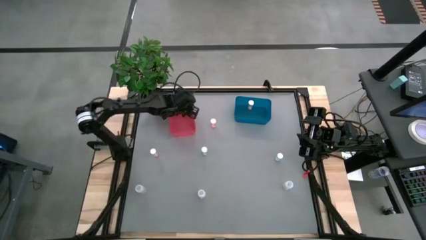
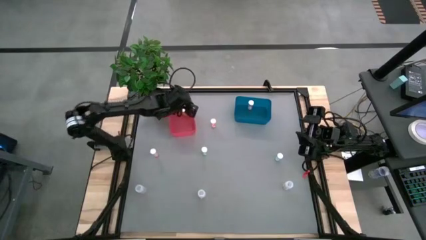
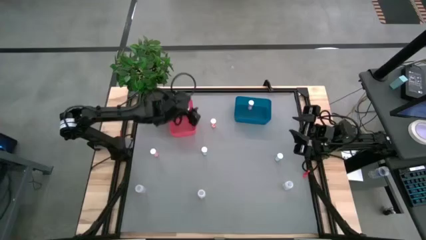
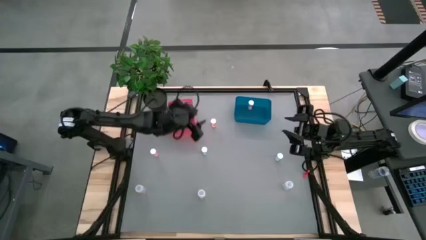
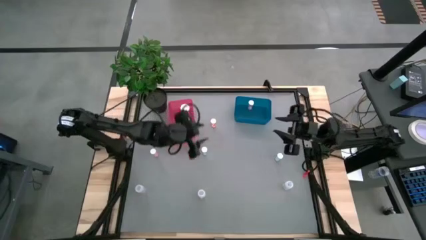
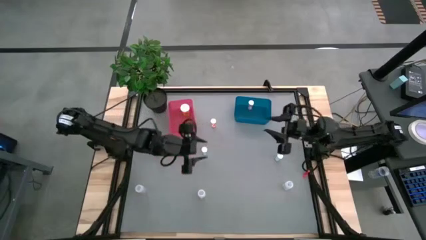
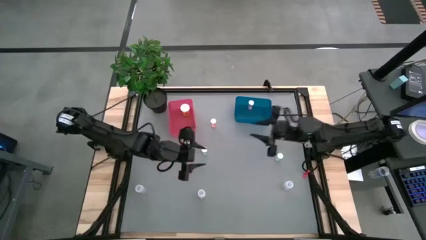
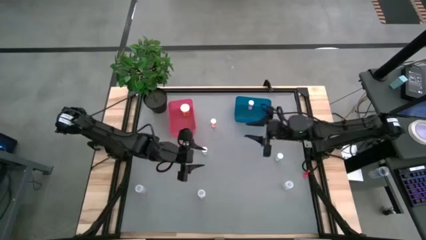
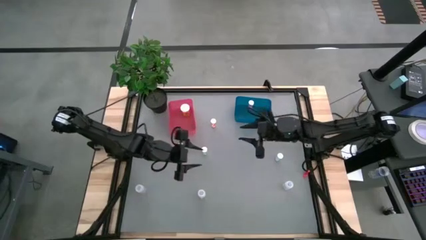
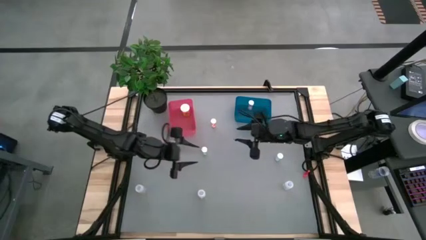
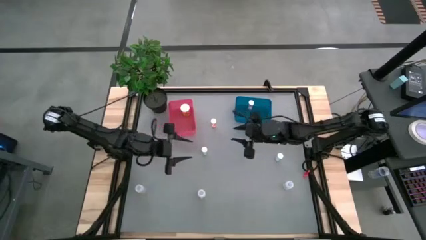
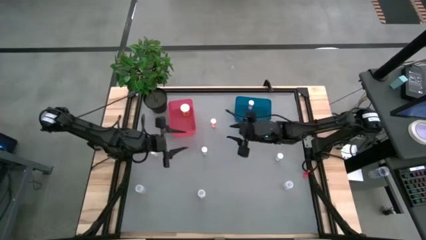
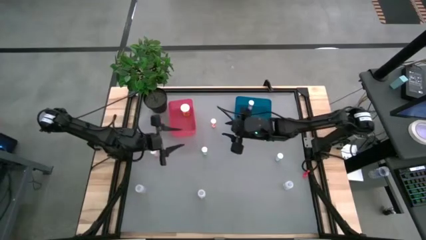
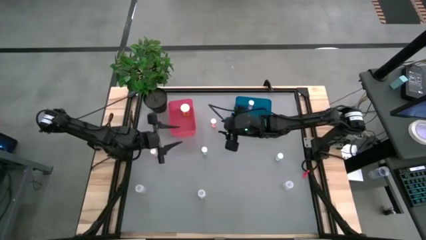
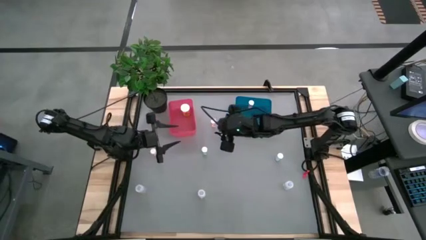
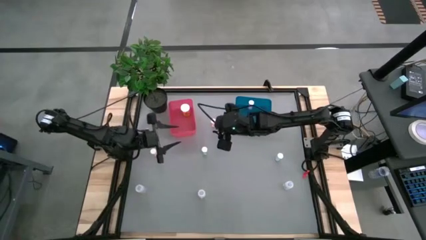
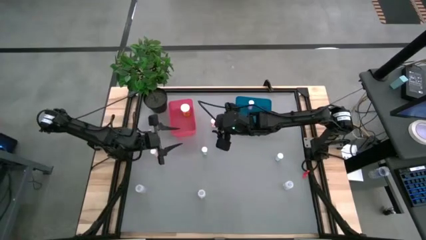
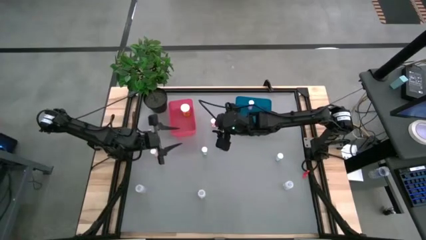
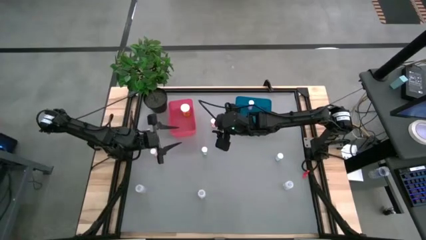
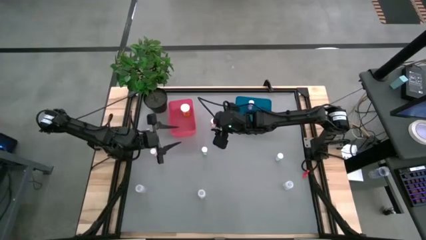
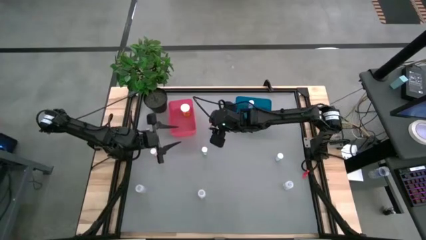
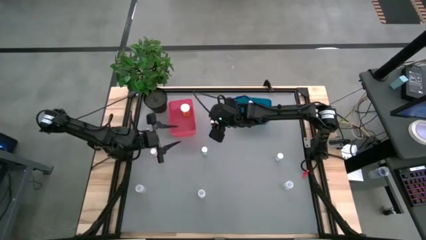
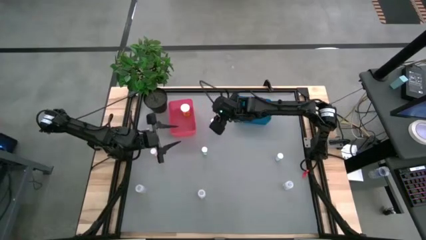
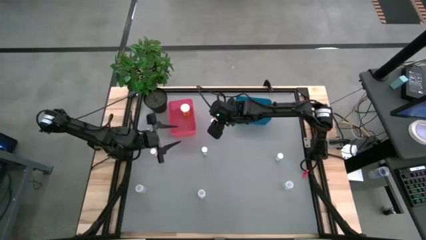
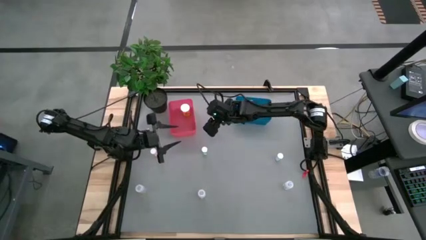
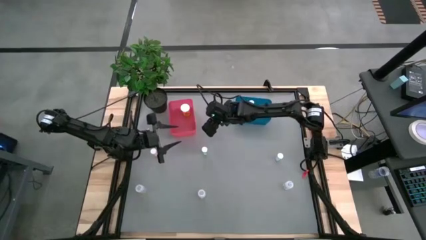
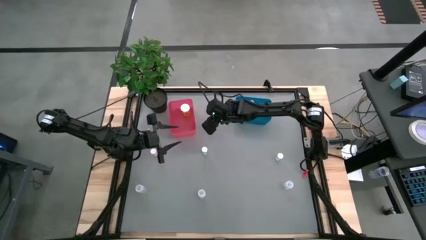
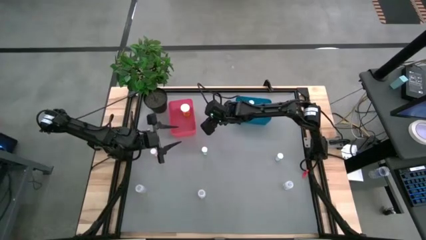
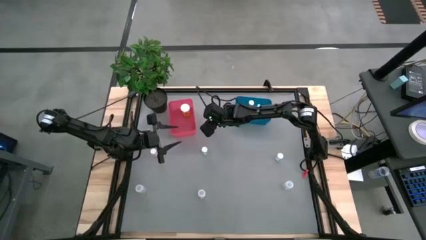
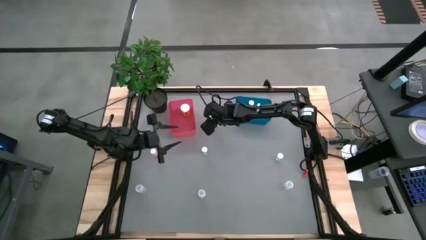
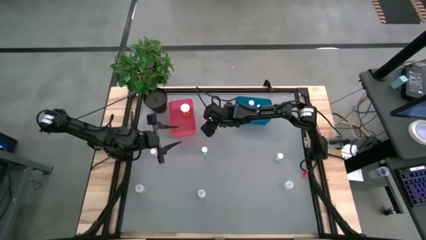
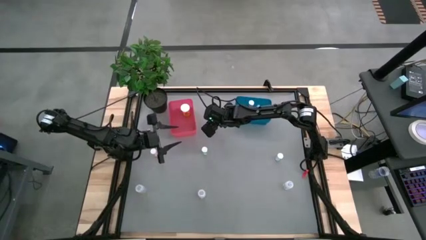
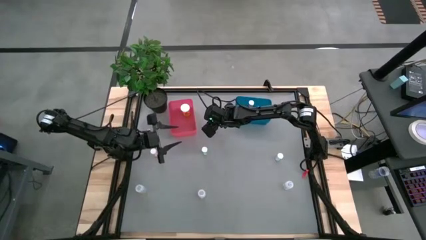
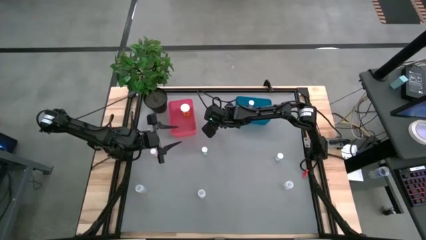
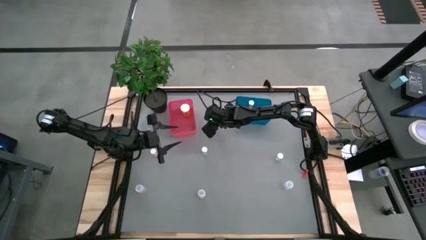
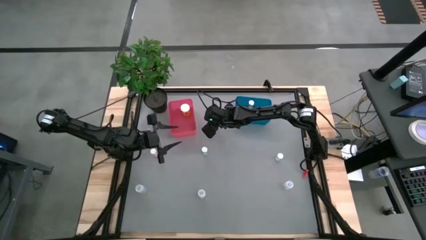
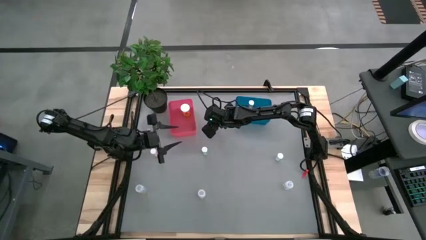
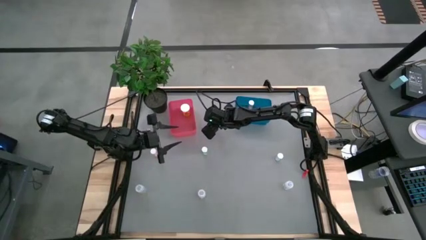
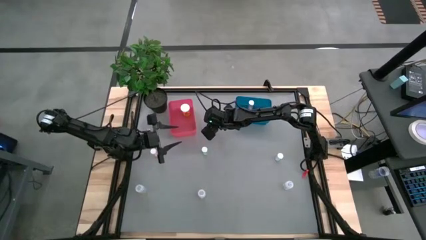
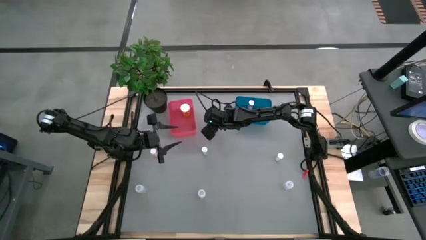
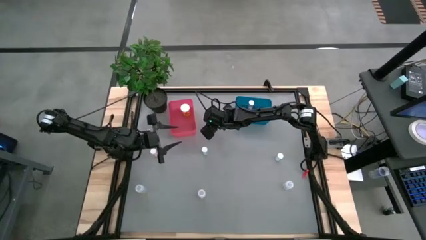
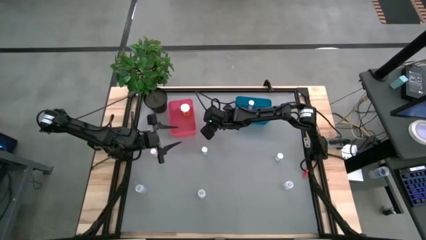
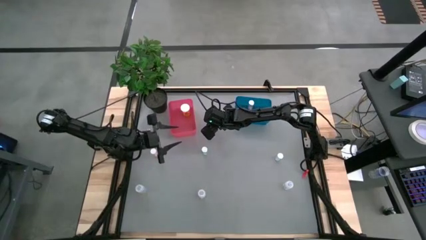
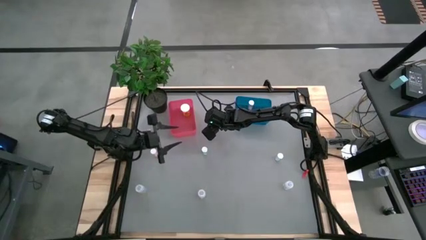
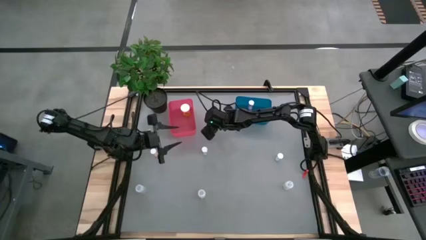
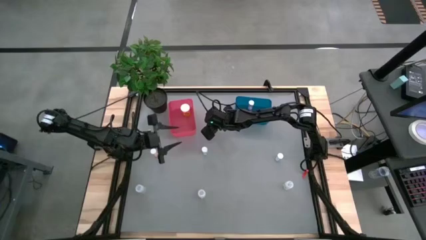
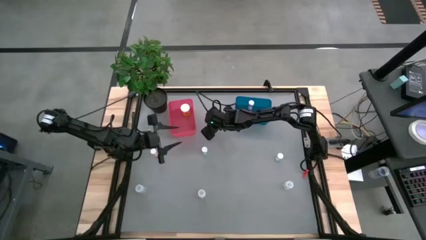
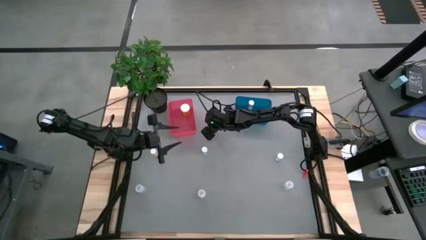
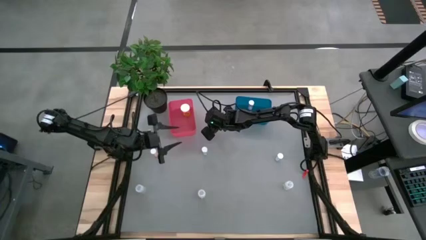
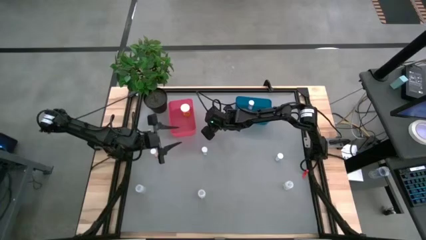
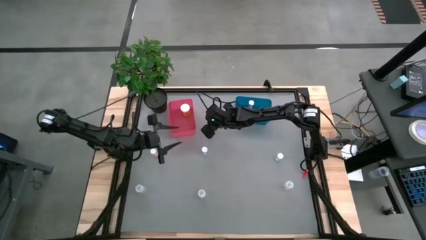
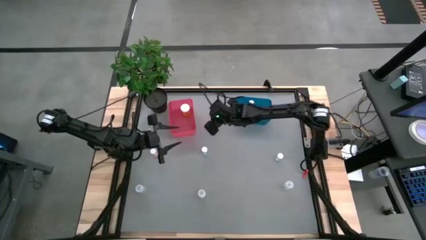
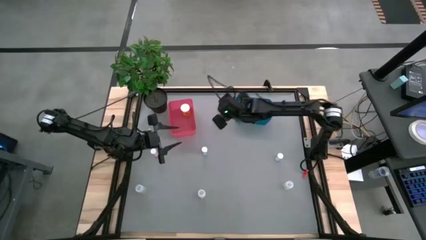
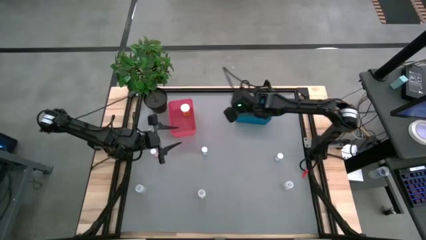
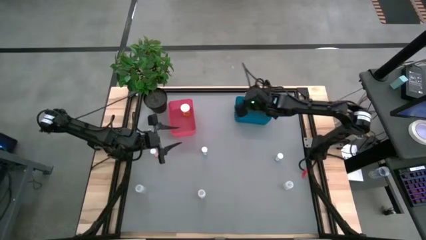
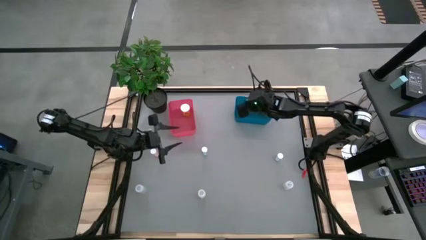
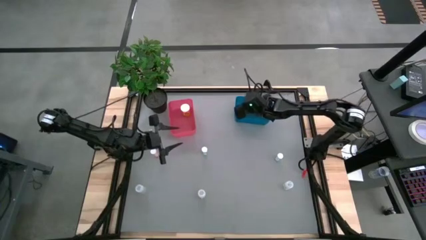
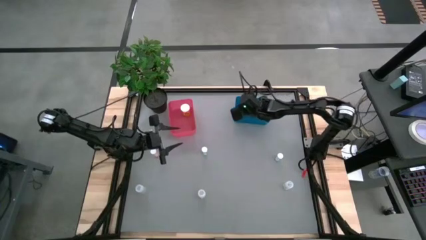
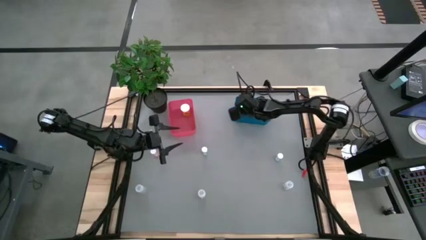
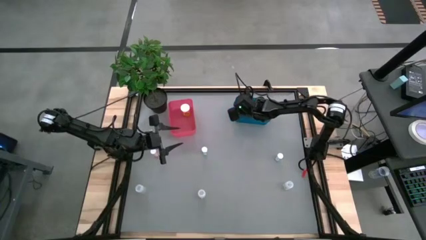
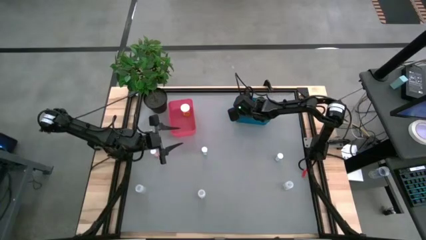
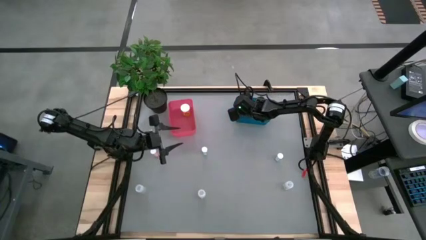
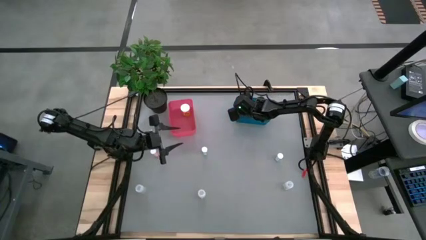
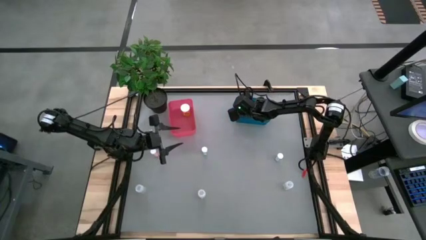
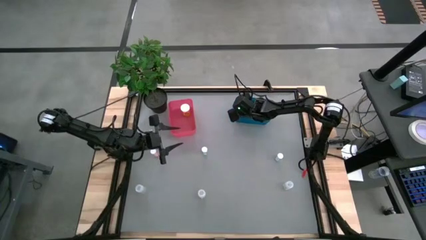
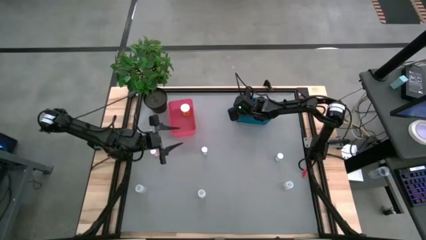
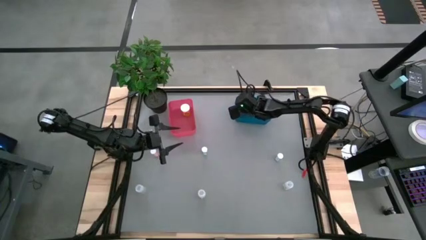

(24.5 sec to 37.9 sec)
Task: Pick and place medicine bottles into bin by pill shape (circle, oval)
Put the pink tablet bottle into the blue bin

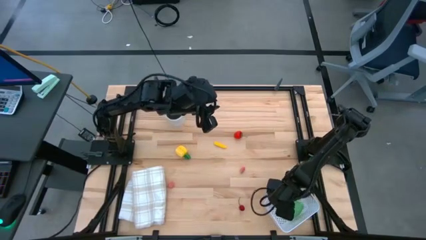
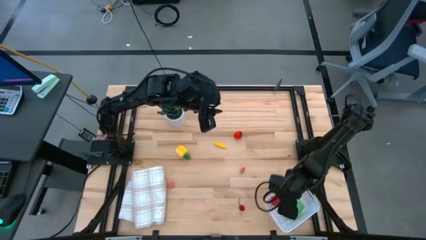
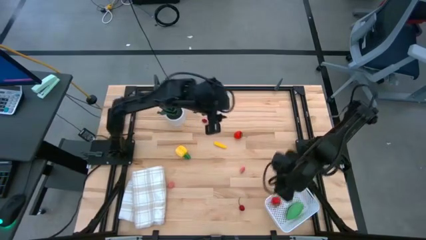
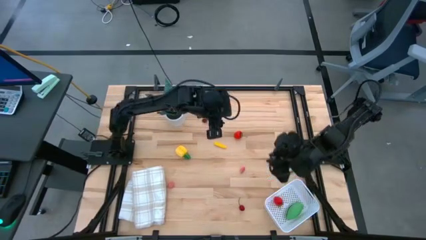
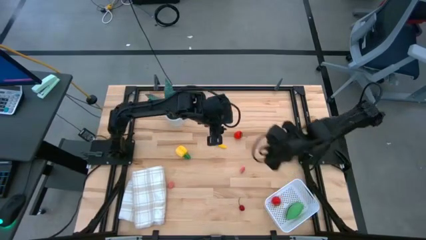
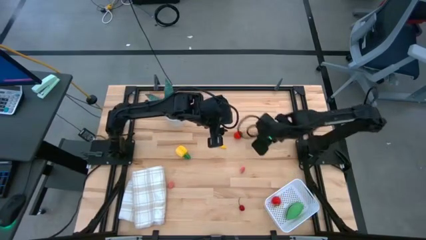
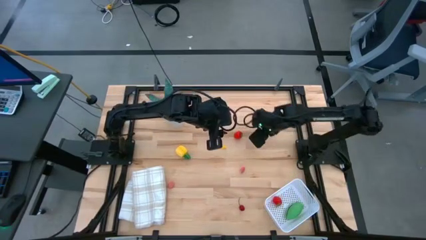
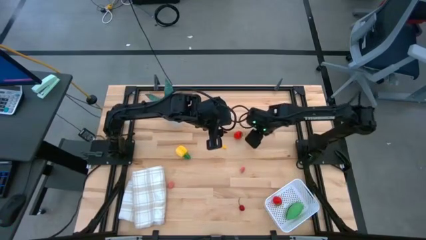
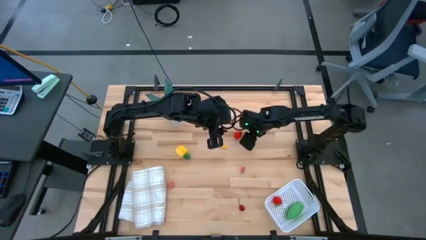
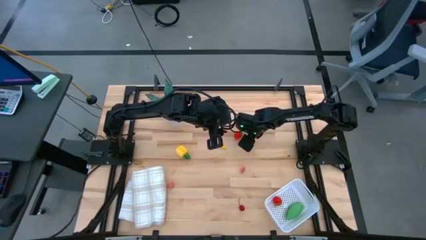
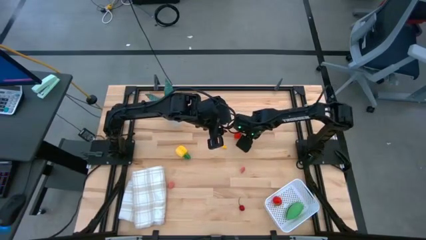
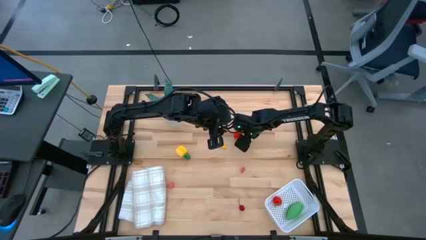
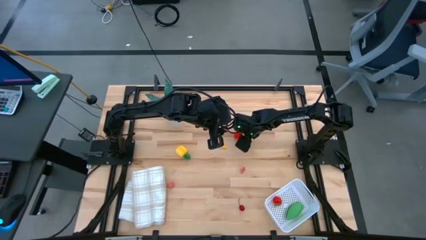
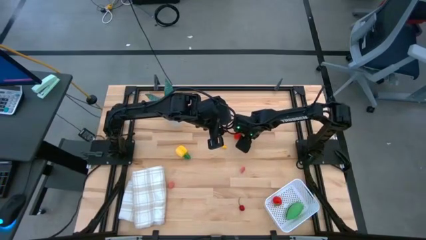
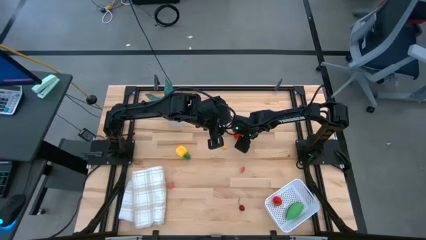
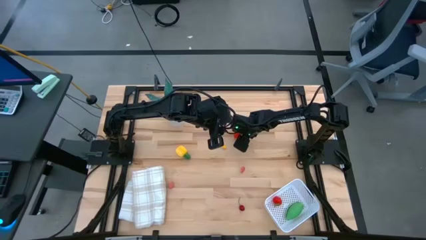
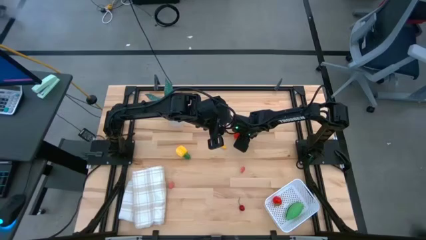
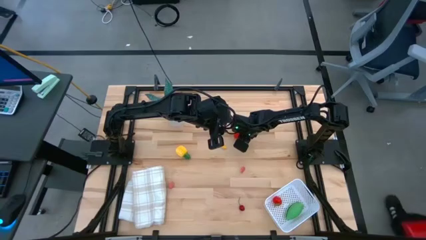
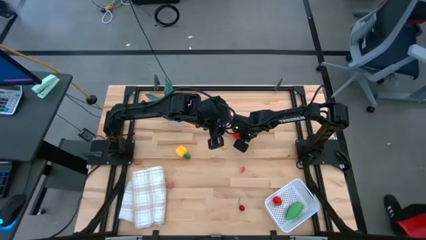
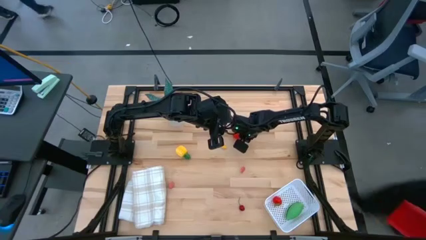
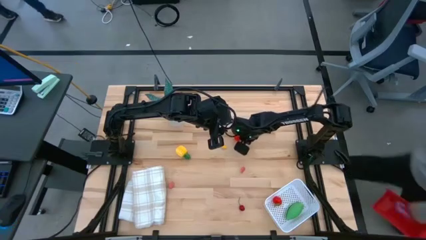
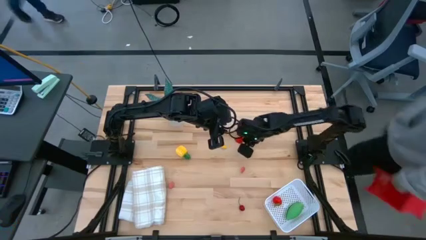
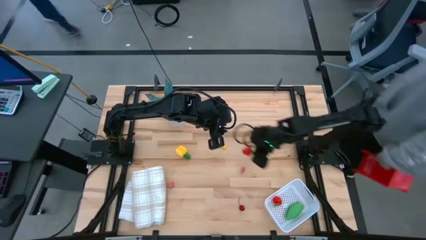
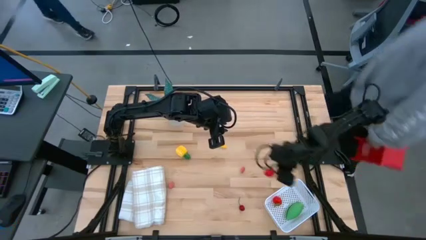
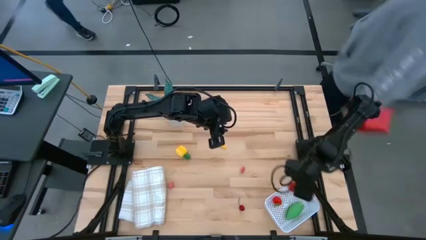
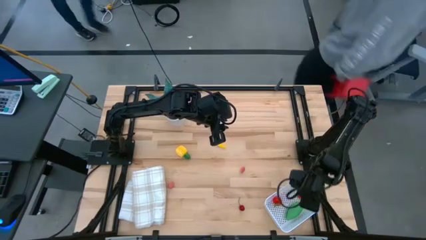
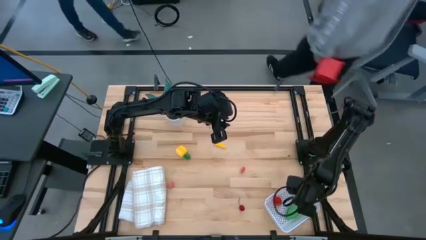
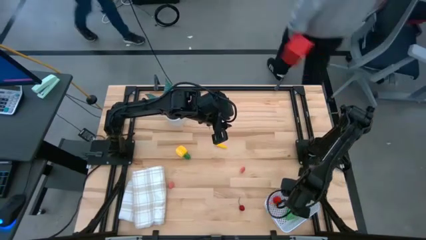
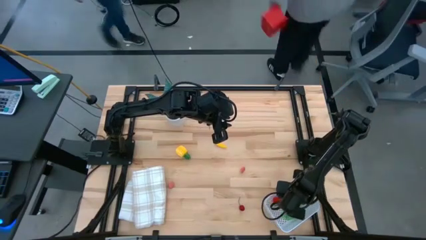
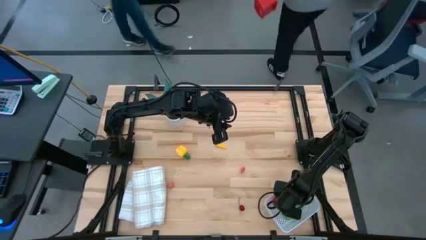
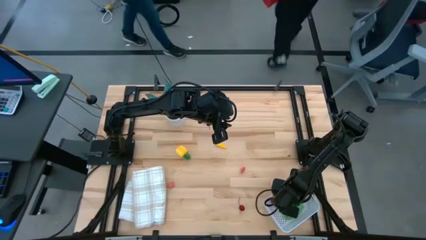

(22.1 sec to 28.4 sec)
Task: Pick and placing Produce into tupperware
Put the red strawberry into the white basket
